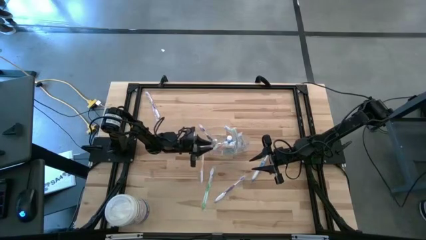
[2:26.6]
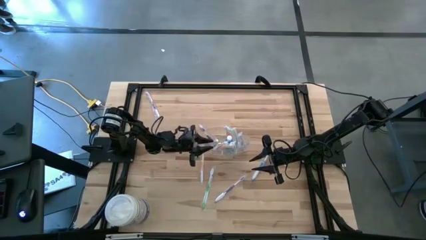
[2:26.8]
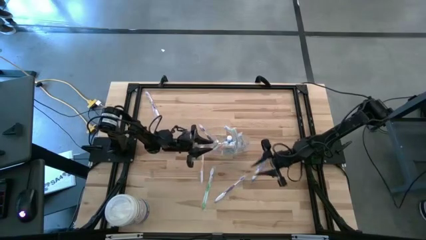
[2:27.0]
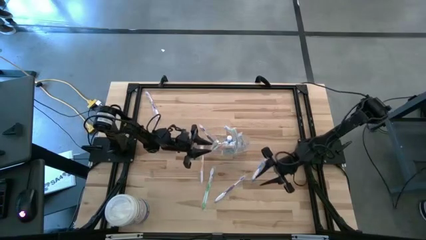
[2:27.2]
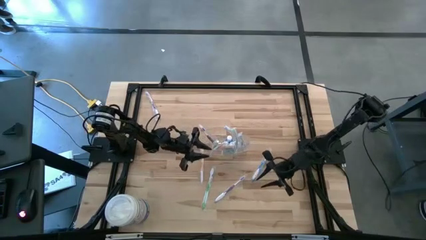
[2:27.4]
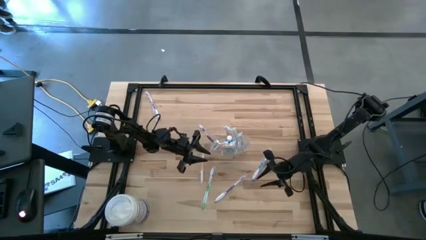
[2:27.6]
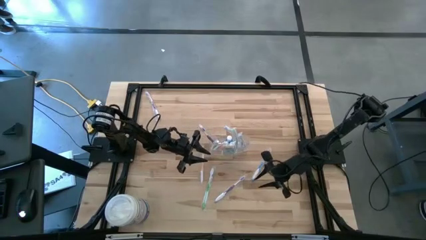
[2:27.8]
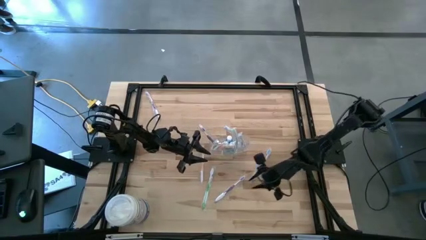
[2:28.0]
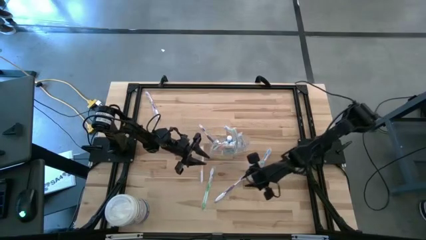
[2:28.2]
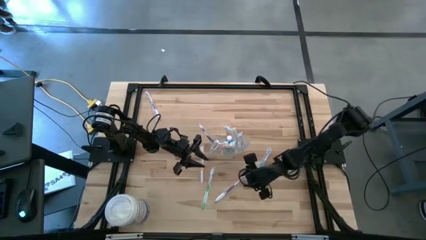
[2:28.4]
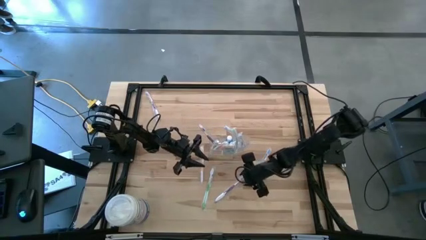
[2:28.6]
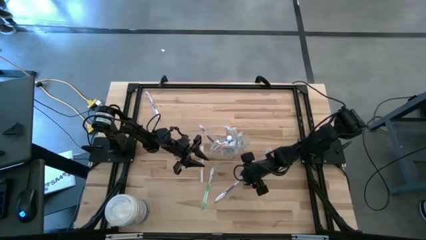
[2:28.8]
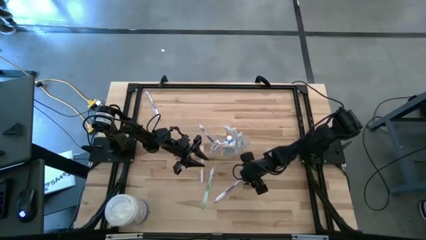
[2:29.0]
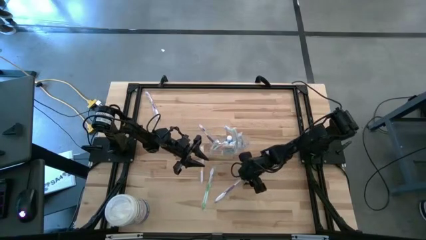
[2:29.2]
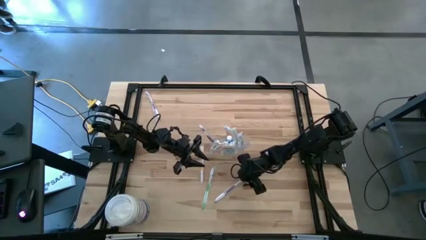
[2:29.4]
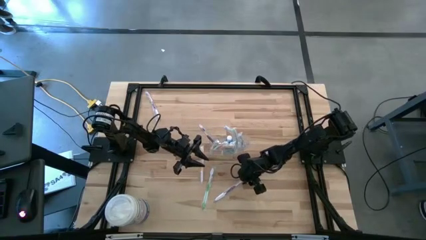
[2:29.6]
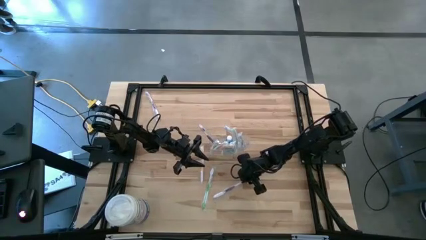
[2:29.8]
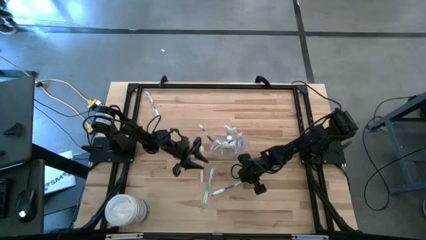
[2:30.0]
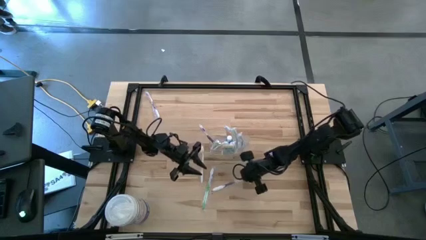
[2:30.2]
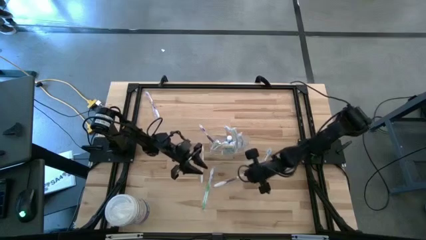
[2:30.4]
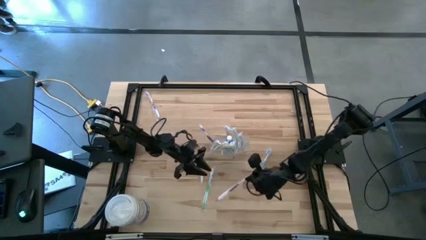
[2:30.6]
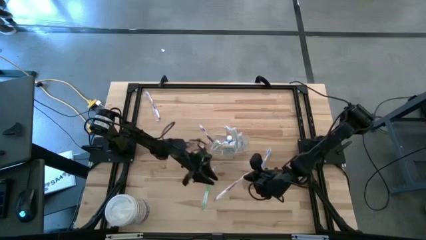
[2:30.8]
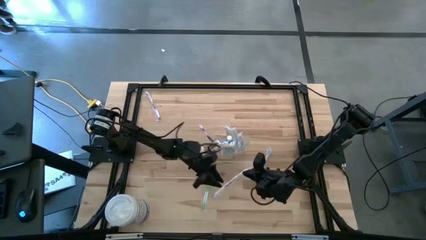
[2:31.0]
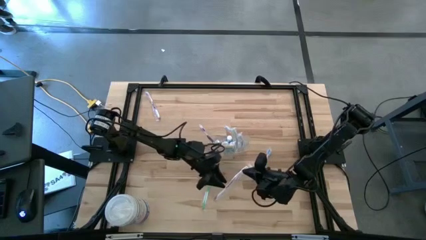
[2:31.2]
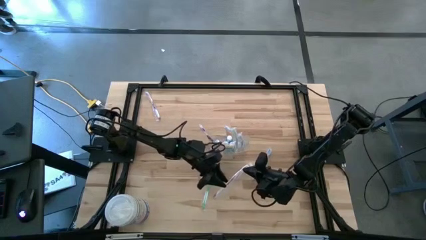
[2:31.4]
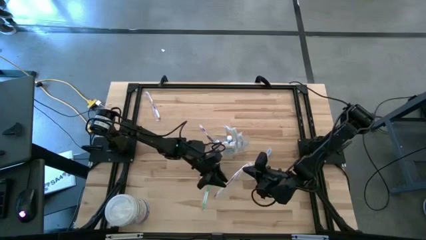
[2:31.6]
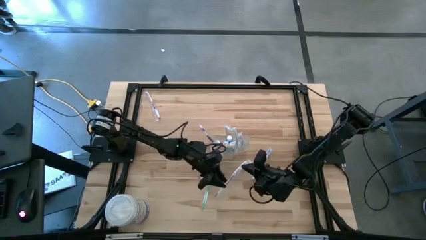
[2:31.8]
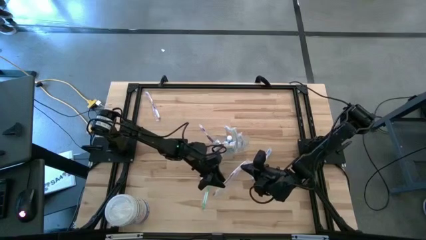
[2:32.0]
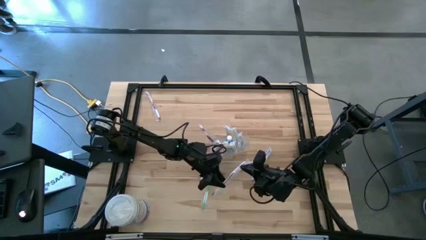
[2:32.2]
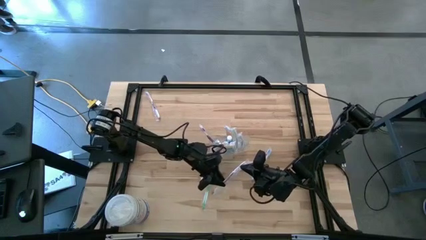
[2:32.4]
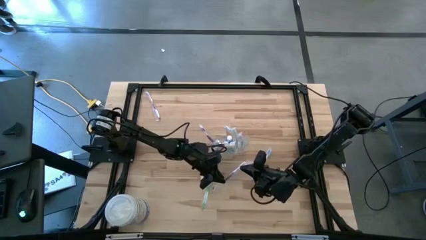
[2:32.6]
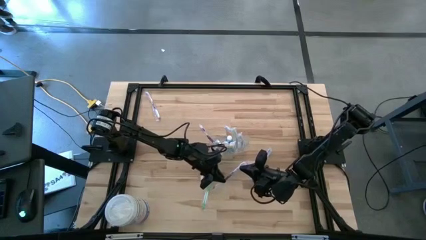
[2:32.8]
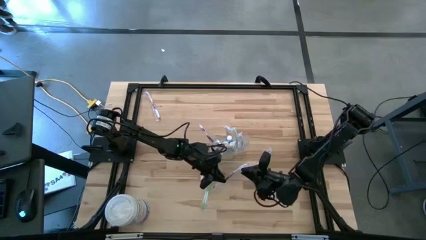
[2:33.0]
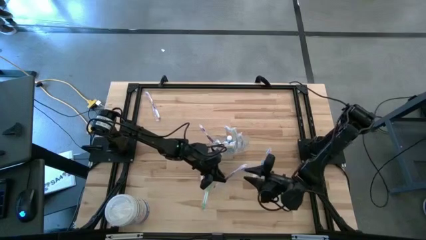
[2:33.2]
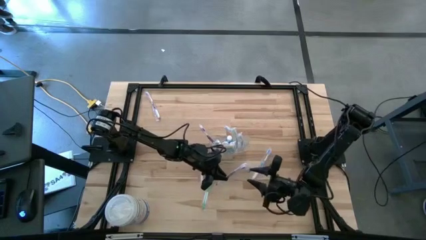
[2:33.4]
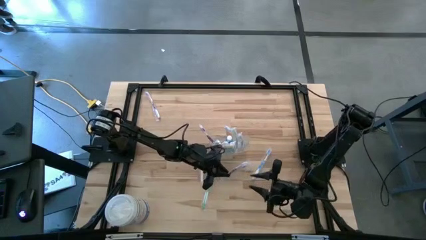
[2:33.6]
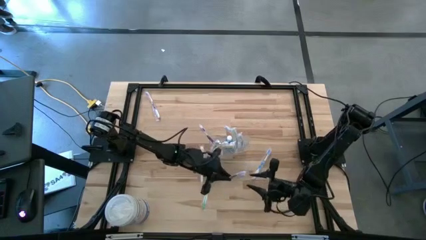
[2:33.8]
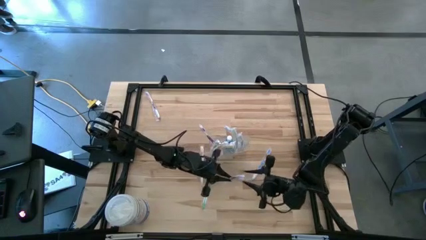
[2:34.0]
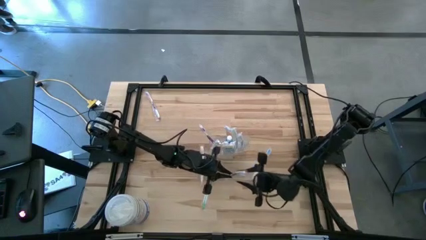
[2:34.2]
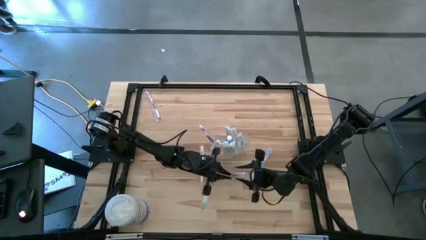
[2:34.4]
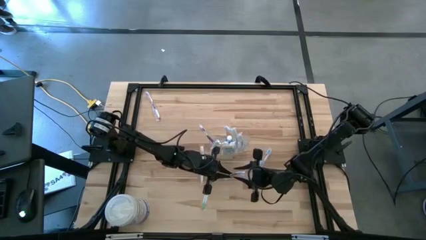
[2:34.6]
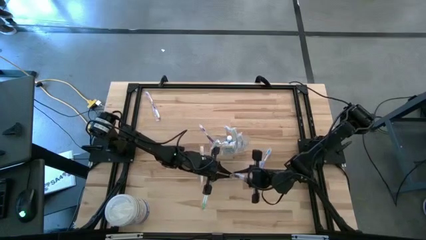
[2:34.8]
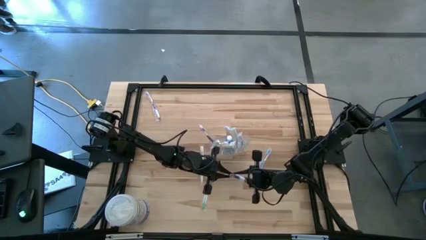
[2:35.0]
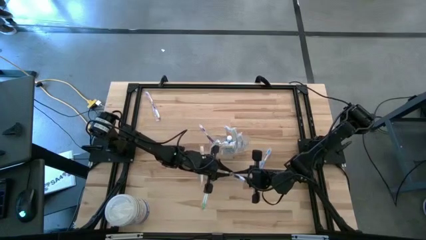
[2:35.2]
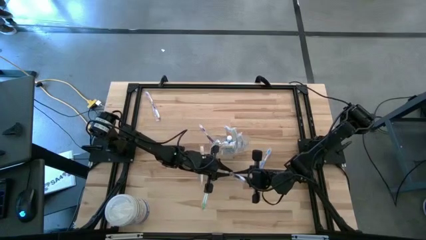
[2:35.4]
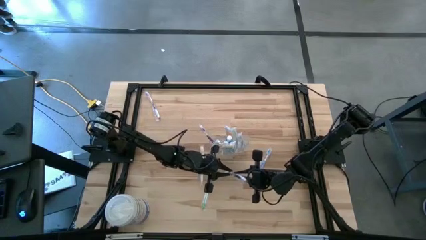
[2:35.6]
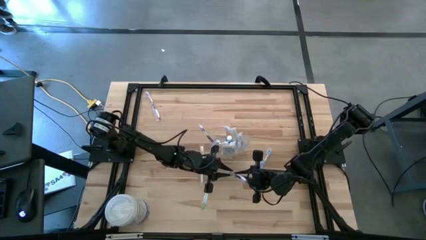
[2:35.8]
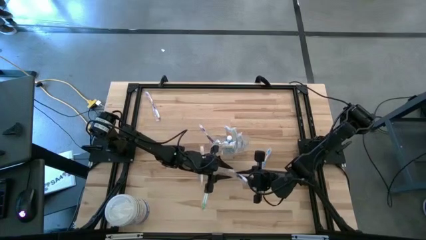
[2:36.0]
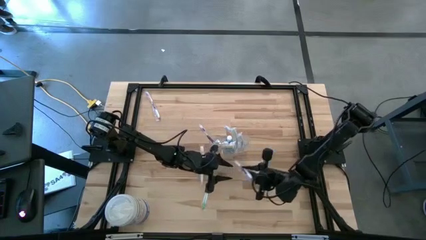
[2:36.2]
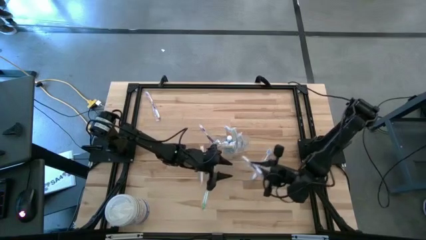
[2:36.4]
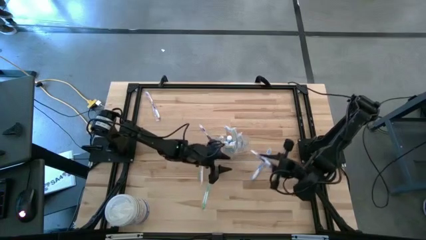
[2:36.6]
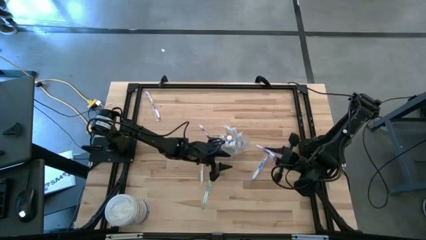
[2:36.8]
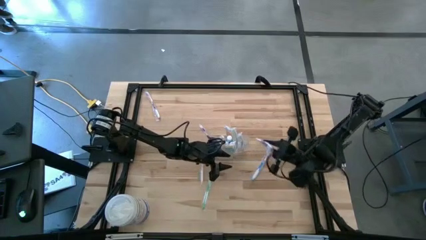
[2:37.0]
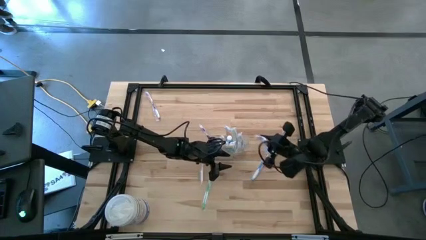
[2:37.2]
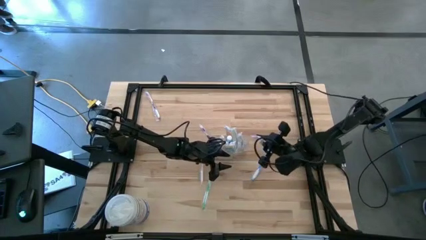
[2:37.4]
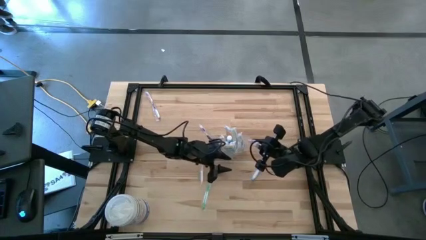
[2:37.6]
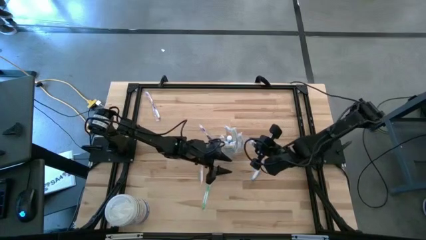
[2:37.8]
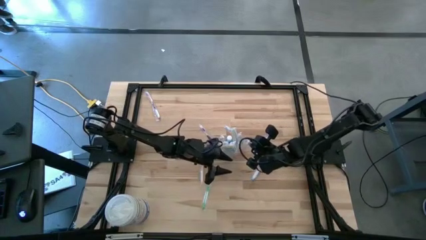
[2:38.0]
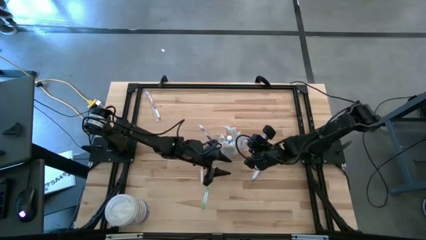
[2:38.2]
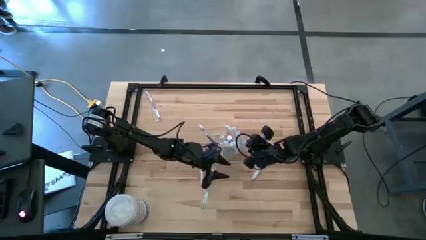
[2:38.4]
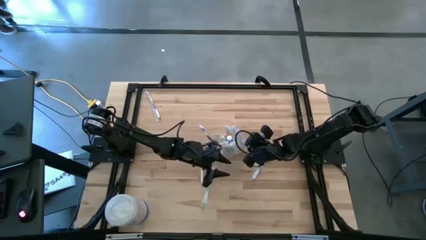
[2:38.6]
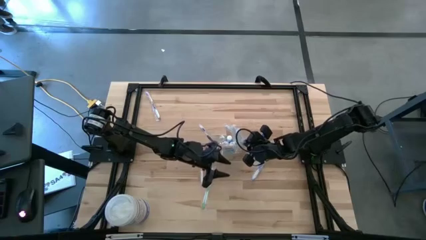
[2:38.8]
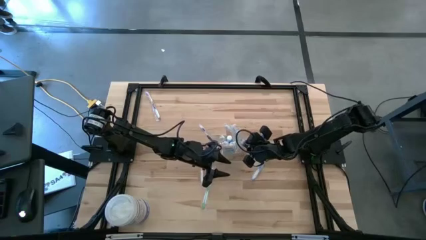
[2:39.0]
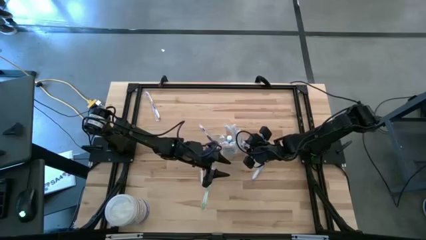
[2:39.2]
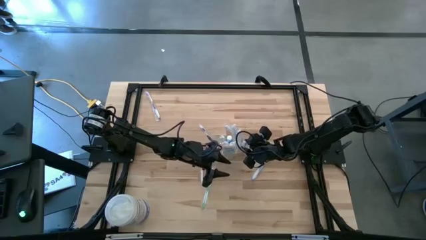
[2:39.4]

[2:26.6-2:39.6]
Task: Pick & Place toothbrushing station
Put the bottom violet toothbrush into the wire organizer
